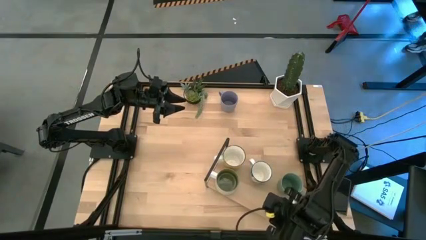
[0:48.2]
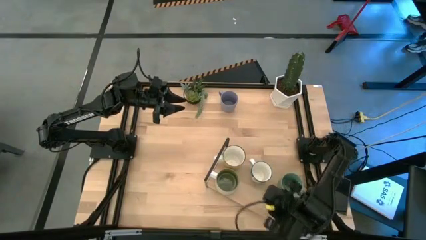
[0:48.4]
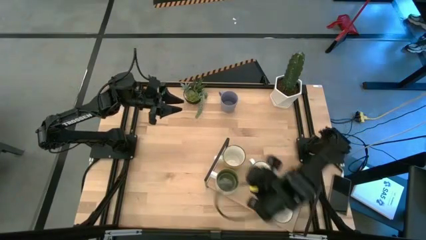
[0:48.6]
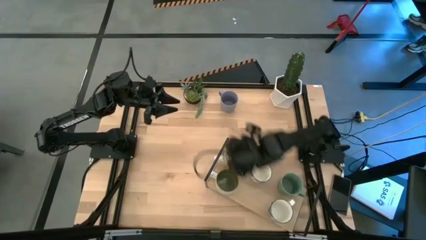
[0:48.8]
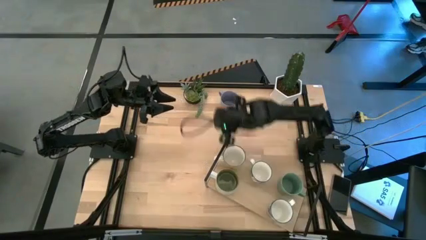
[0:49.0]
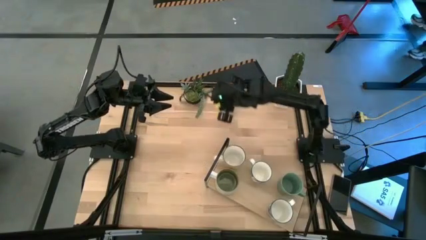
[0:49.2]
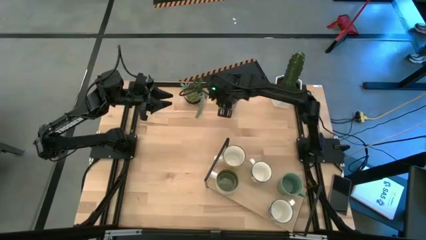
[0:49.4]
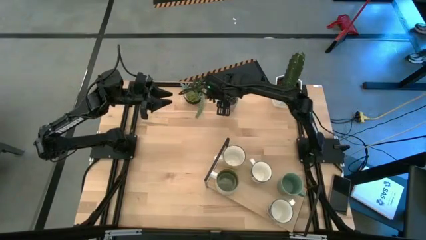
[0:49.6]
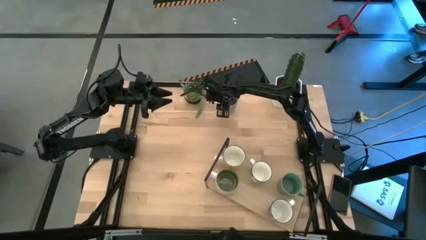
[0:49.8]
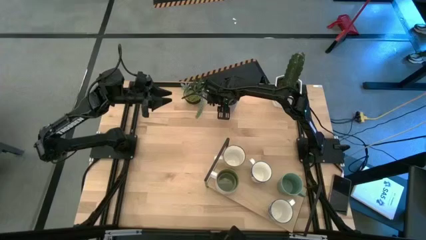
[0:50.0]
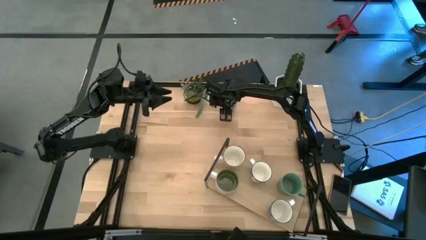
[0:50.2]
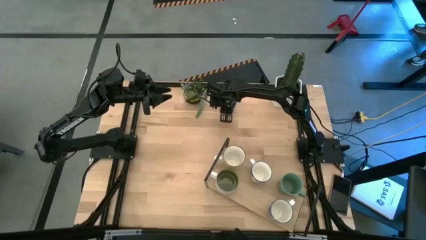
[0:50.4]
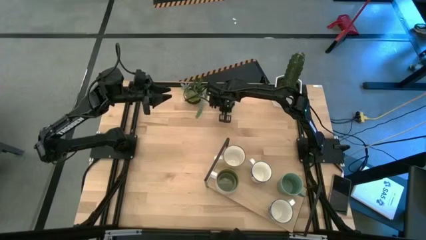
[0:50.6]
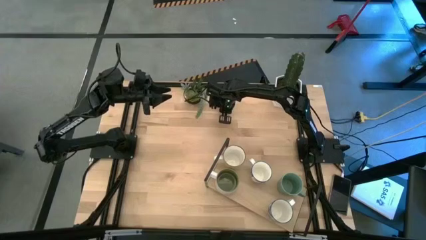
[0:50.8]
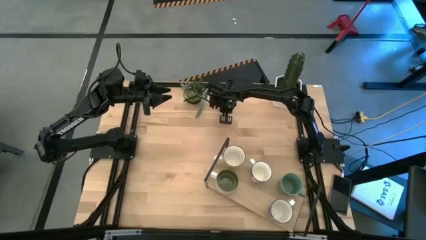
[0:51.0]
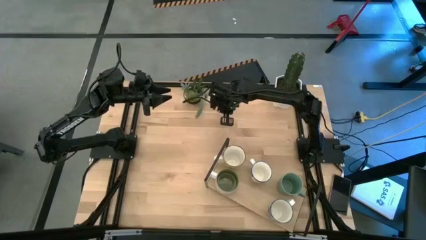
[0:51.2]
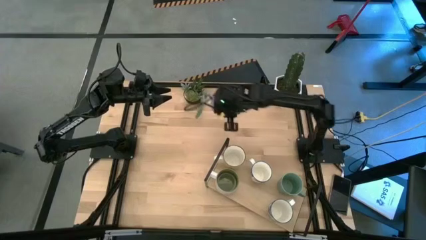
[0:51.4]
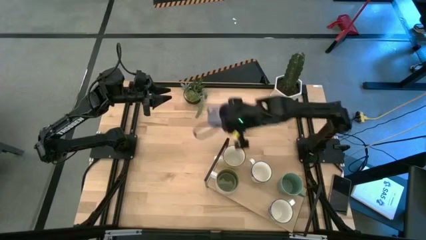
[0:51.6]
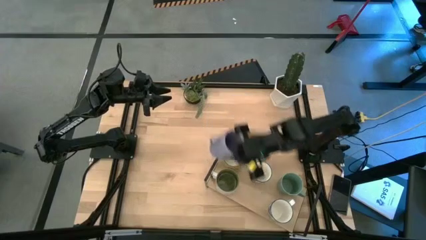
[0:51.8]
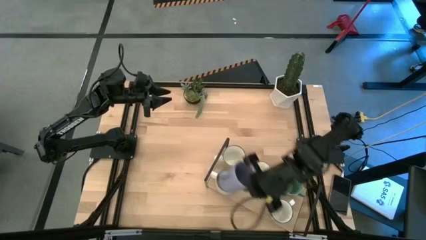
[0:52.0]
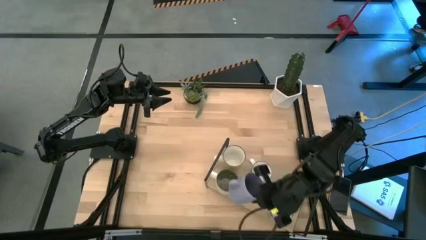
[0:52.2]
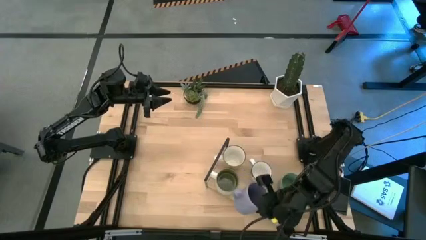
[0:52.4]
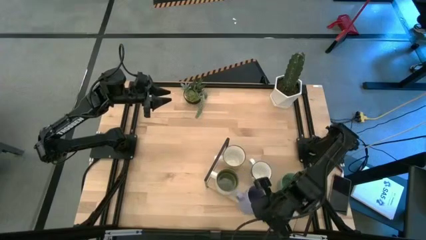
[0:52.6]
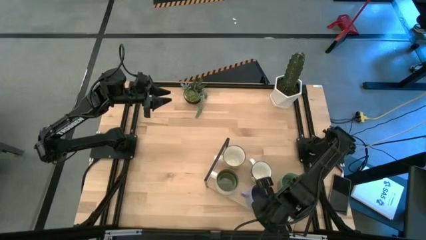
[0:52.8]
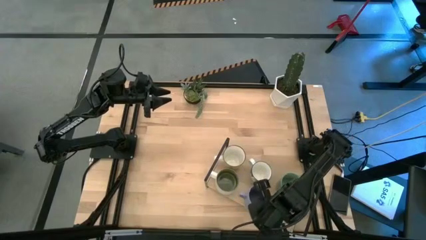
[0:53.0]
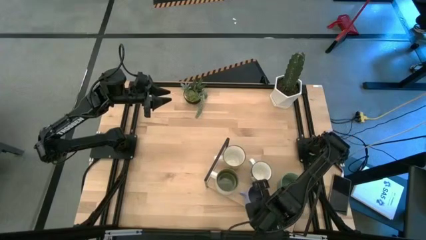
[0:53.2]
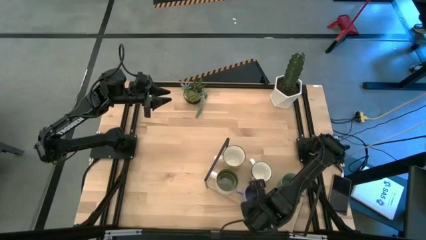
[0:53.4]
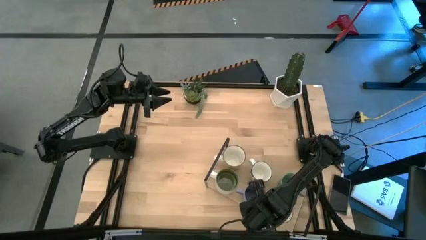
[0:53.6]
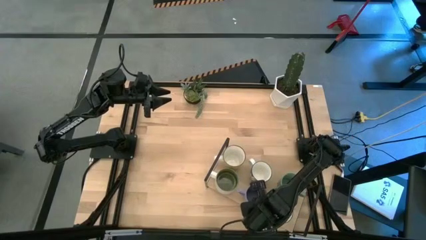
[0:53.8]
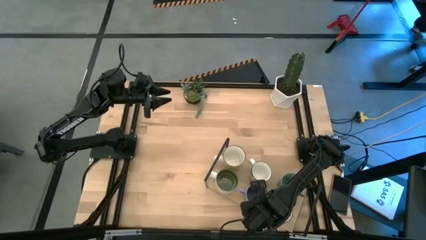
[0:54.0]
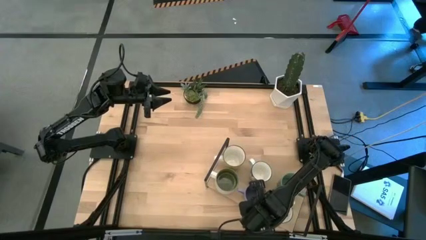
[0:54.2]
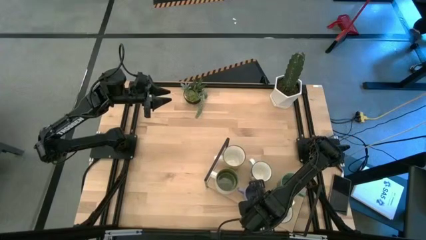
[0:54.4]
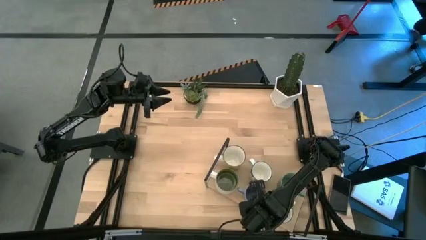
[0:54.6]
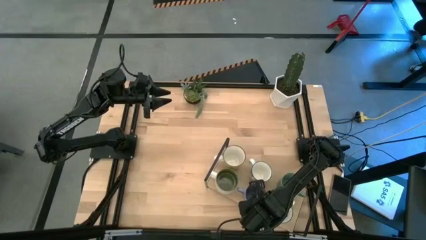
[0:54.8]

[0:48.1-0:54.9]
Task: Place coffee mugs
Put the purple mug on the shelf

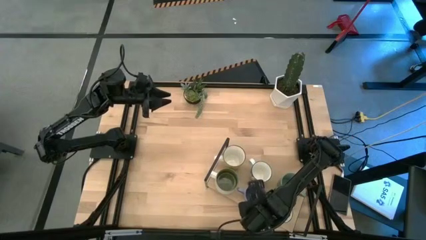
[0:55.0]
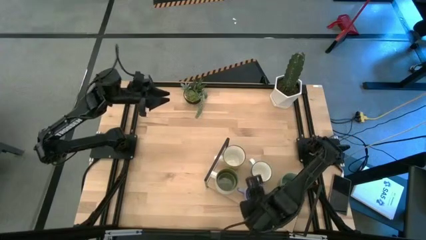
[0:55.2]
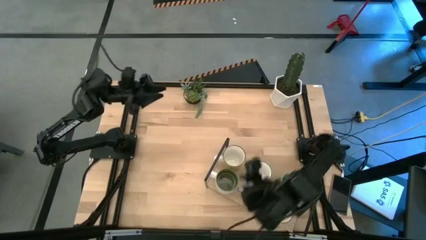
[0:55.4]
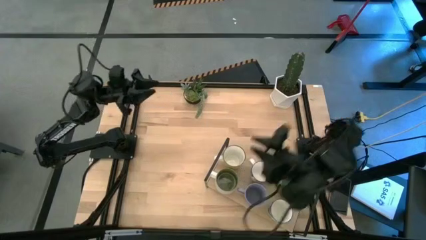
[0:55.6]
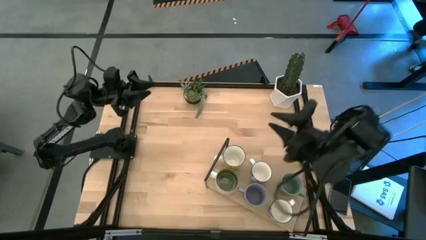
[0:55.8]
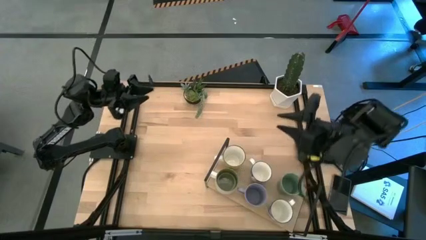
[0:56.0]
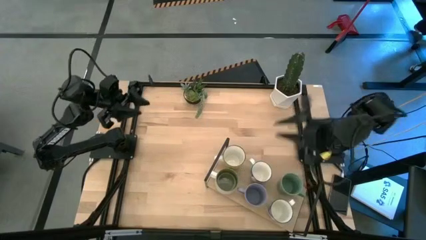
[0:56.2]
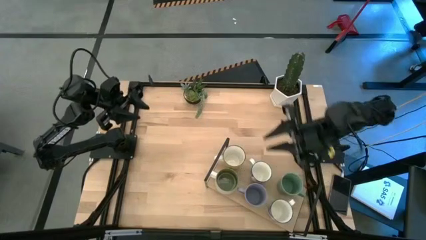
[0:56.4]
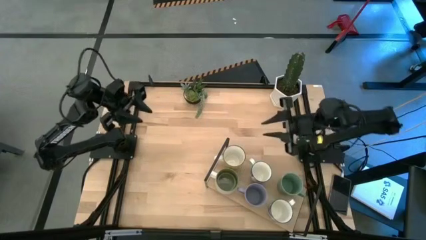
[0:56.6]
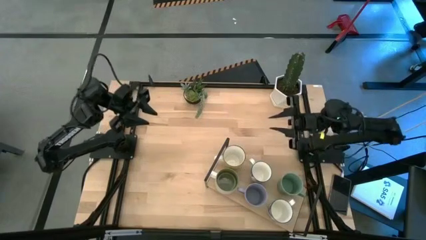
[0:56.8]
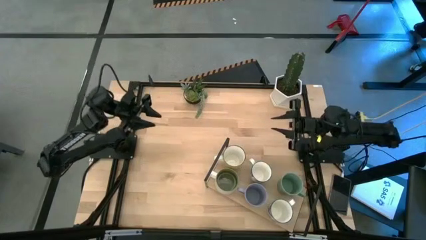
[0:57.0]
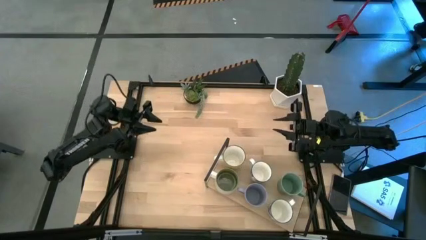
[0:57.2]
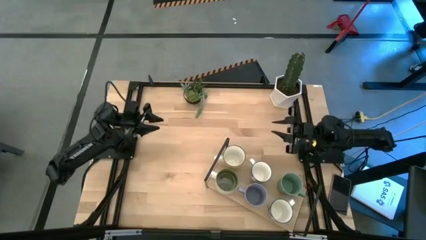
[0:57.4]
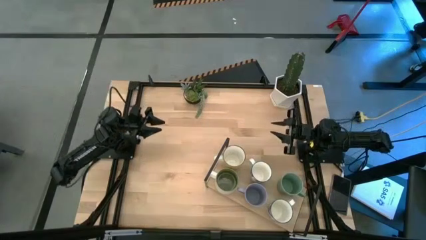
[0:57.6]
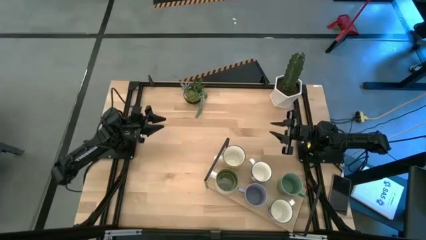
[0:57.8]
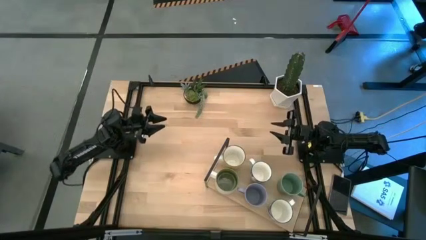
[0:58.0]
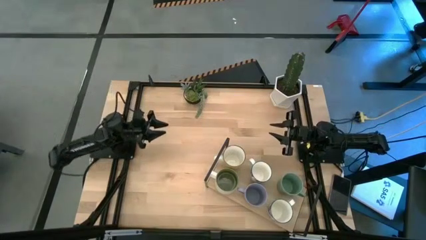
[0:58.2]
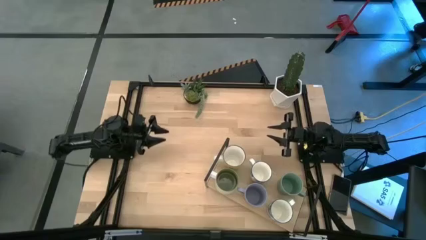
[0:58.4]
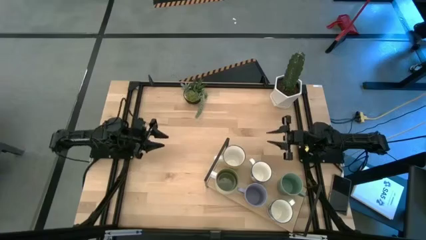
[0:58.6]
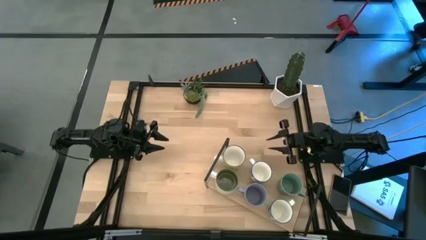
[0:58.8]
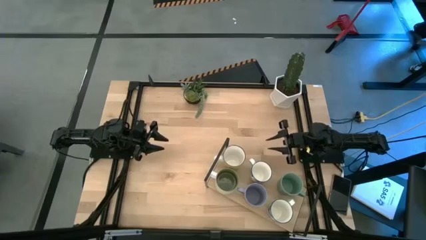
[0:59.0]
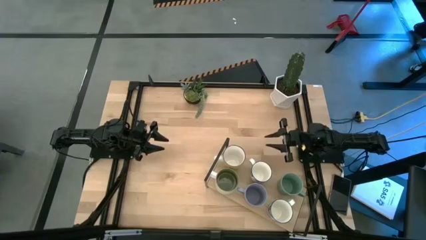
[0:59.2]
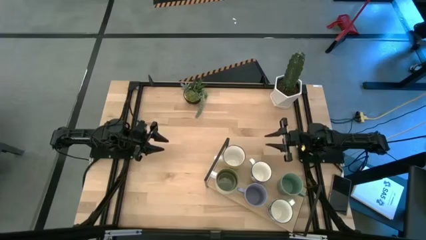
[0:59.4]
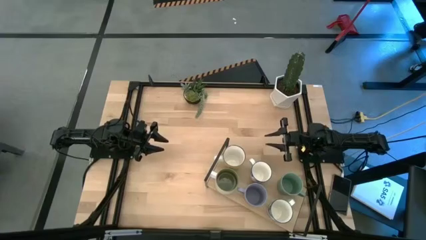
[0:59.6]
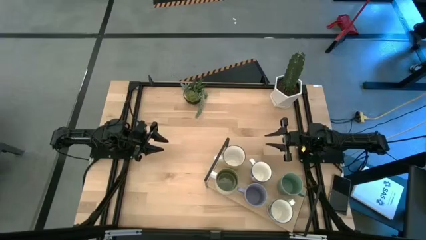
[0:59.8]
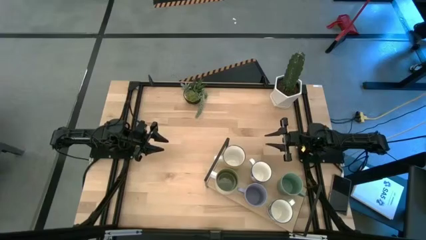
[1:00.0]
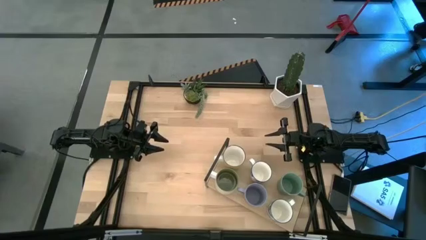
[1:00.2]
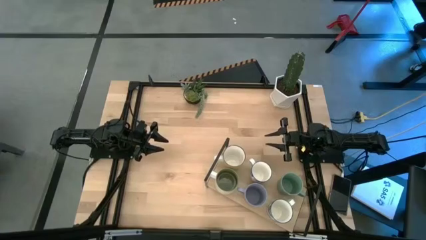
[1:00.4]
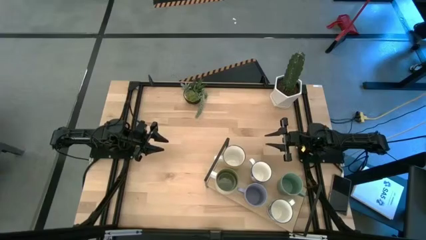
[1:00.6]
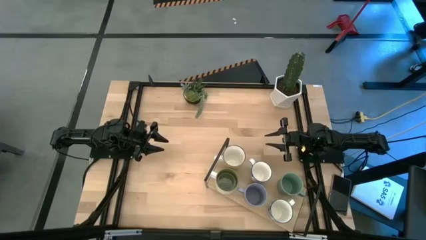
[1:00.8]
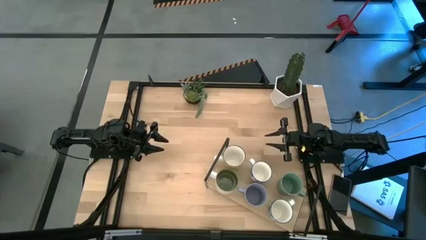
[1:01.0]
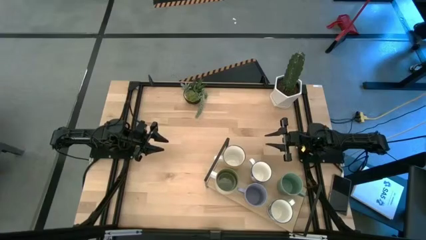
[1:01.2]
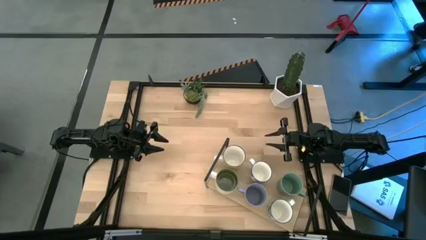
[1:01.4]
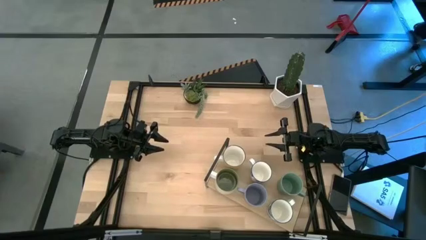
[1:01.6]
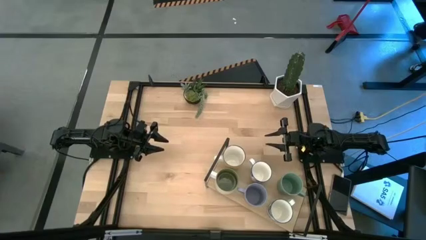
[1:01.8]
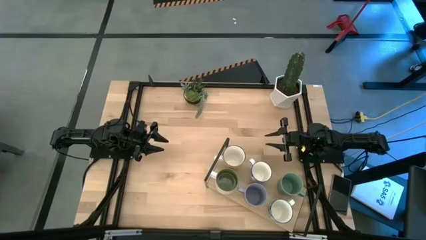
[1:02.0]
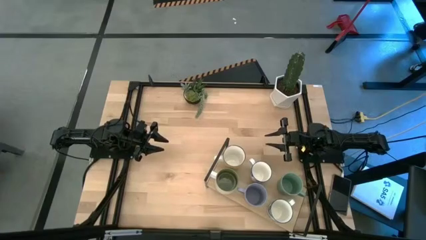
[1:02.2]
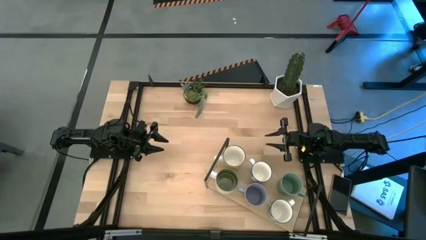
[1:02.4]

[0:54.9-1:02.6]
Return to Home Position
